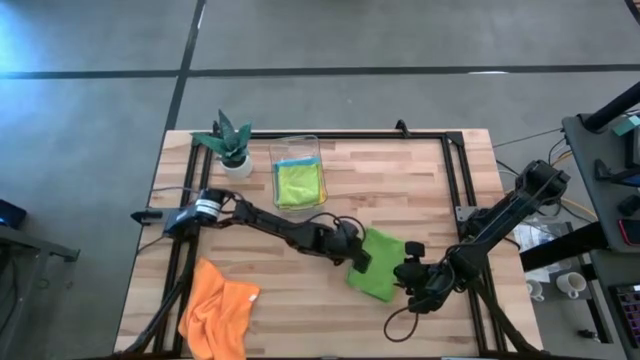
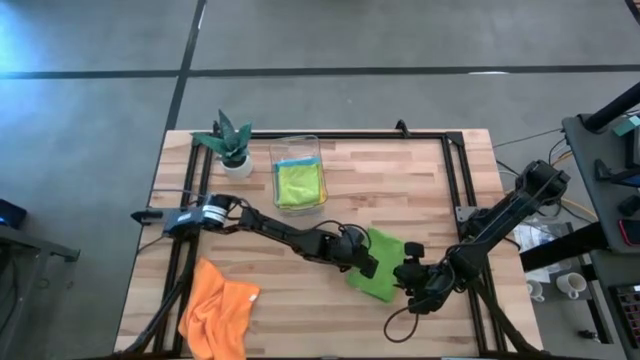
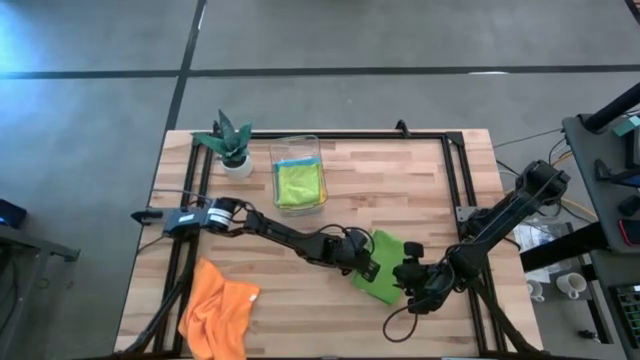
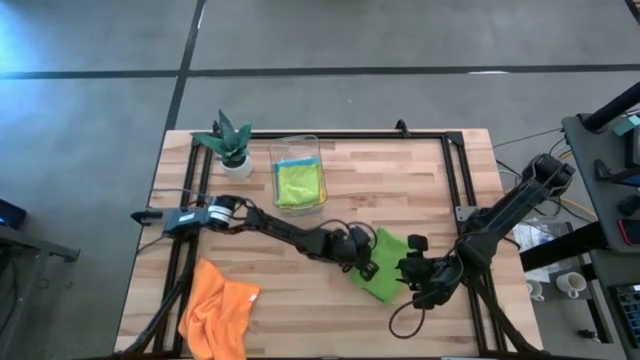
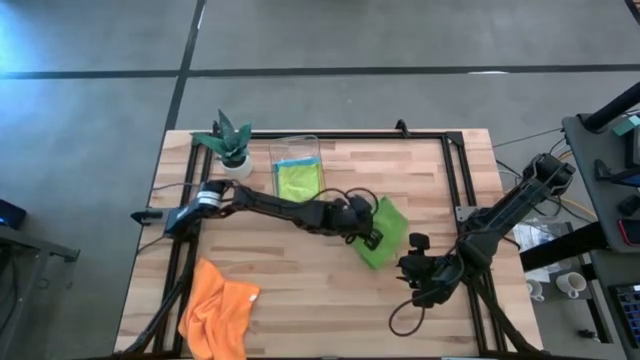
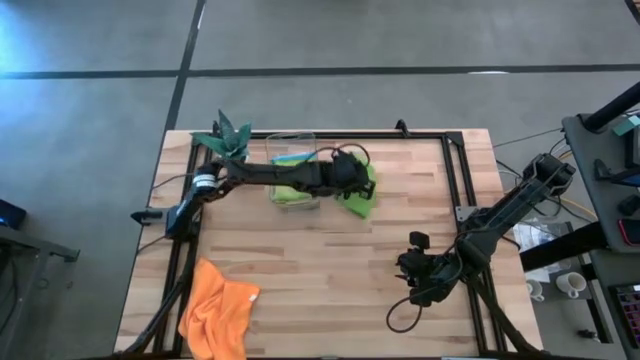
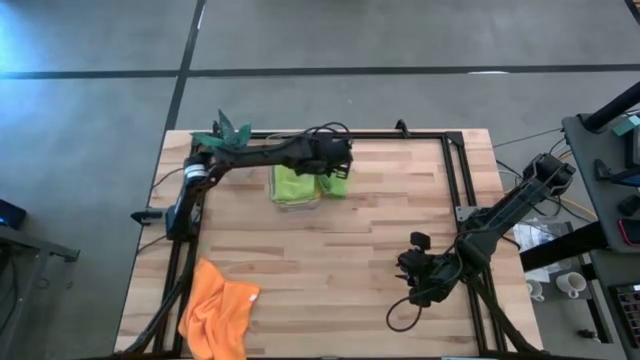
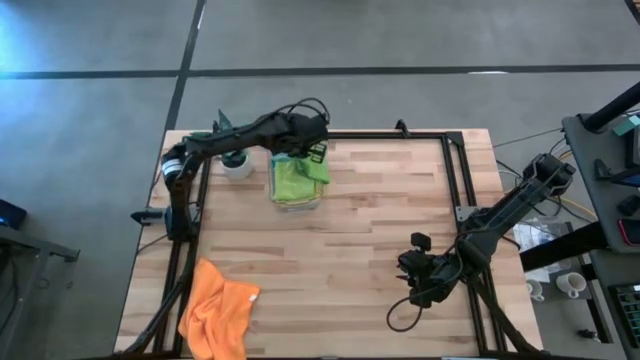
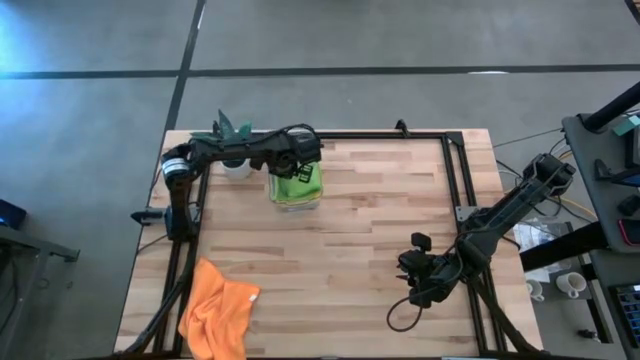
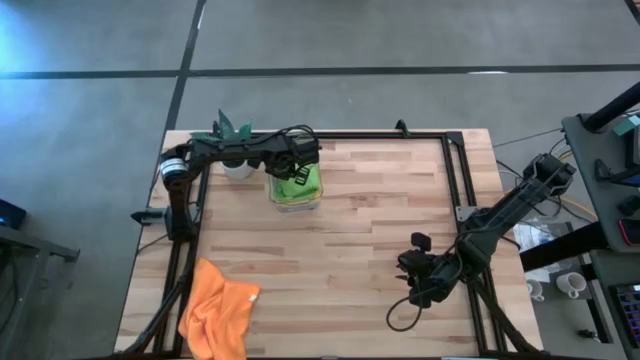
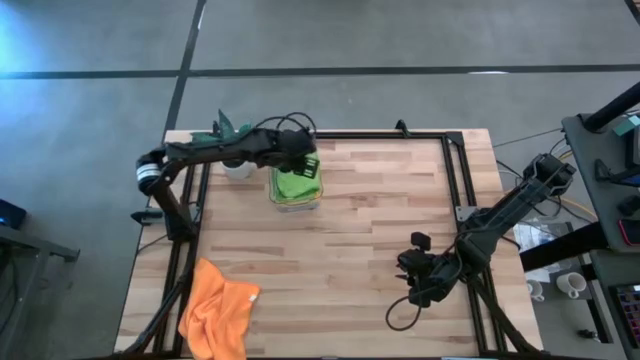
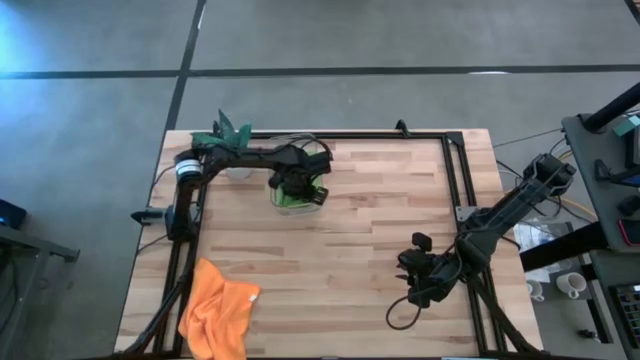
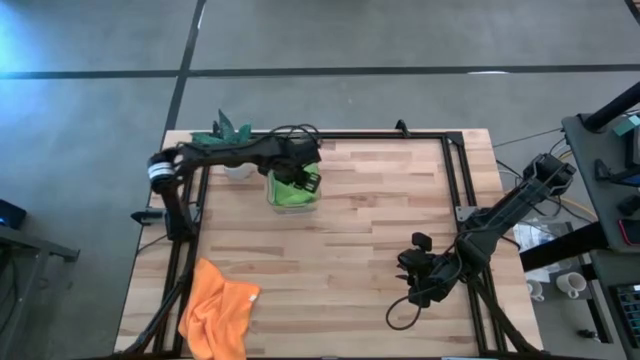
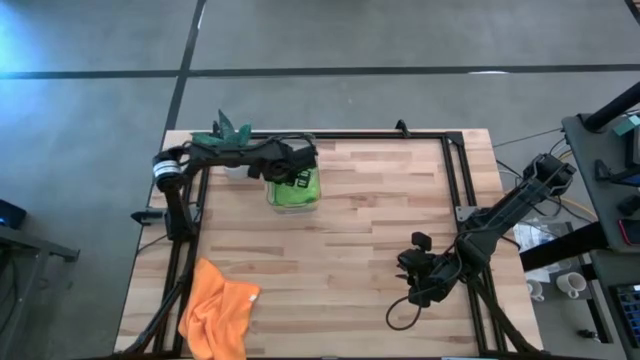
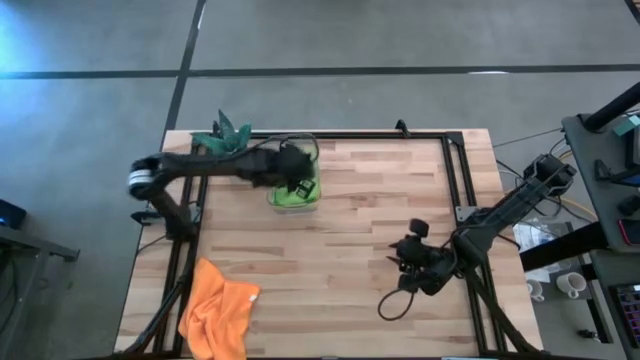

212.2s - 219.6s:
Task: Fold microfiber towels
Stack the green microfiber cloth on top on the light green microfiber cloth into the bin

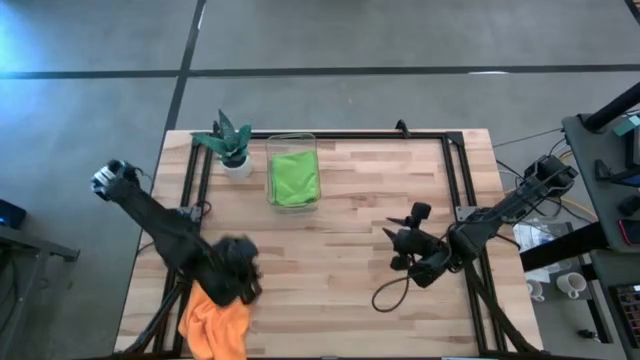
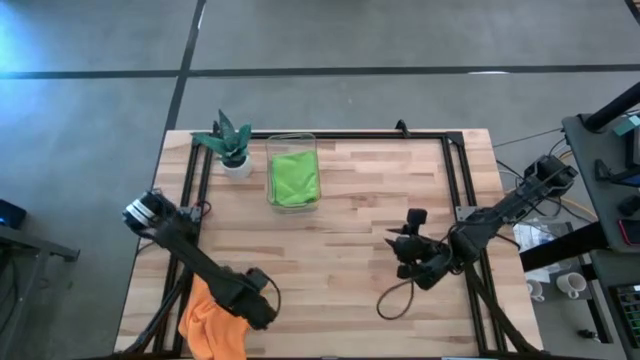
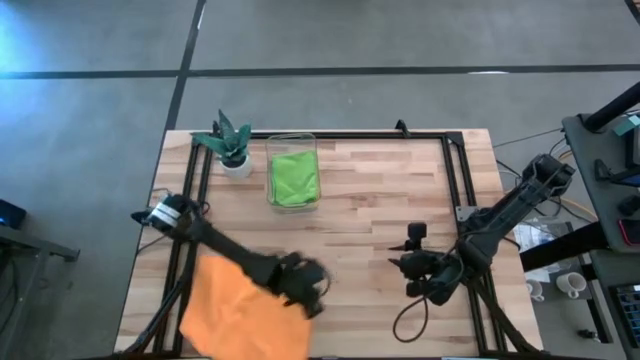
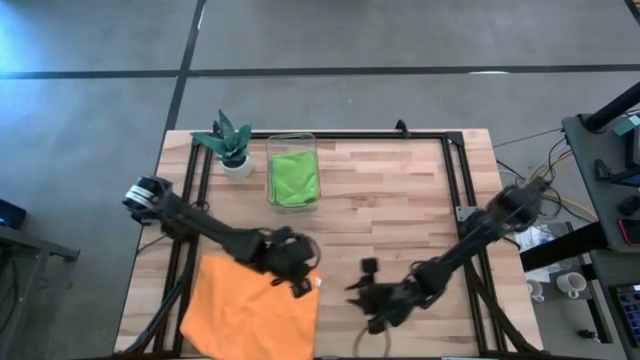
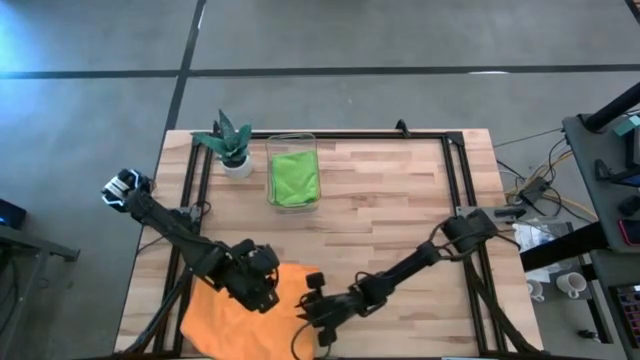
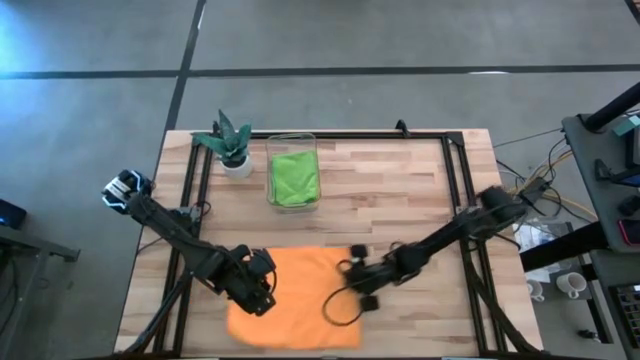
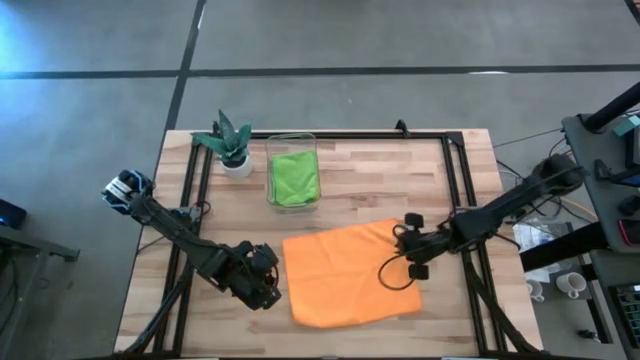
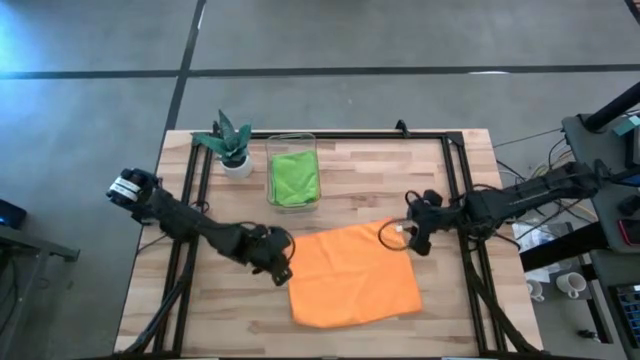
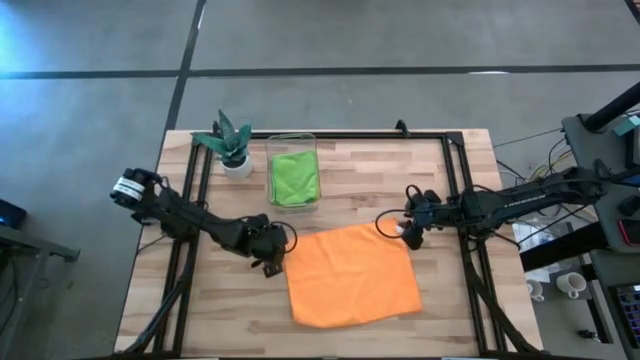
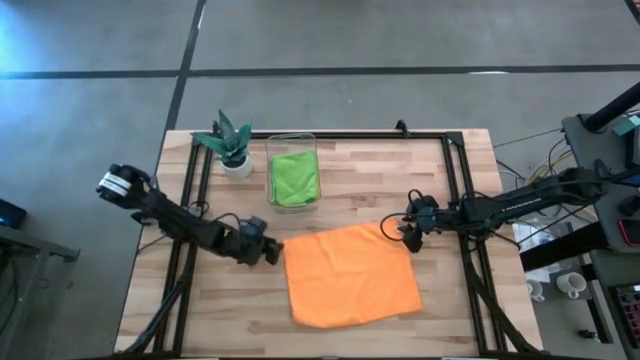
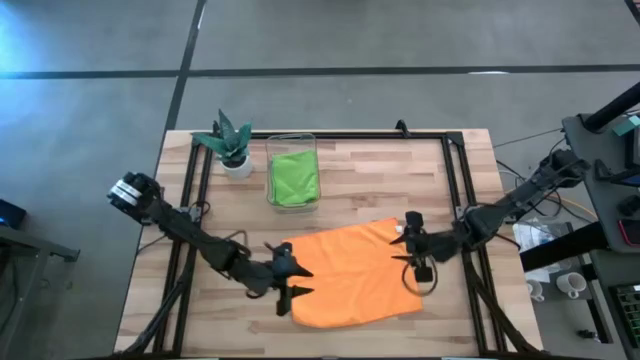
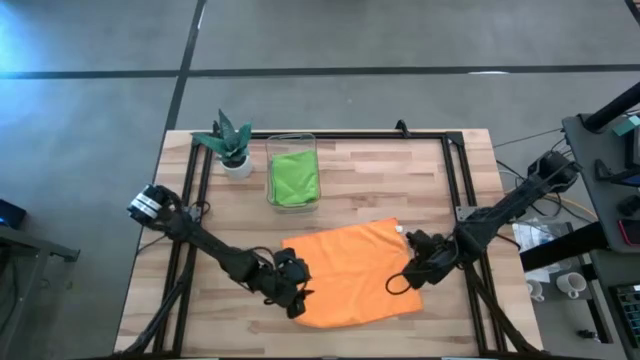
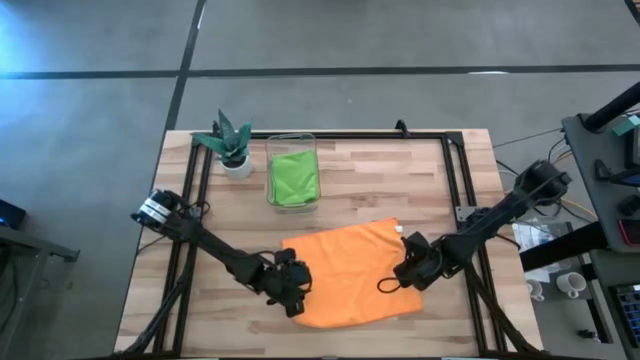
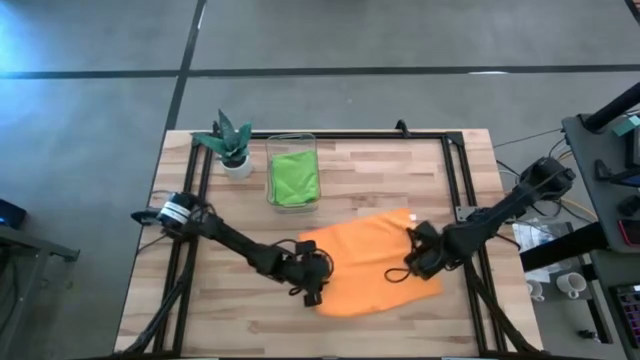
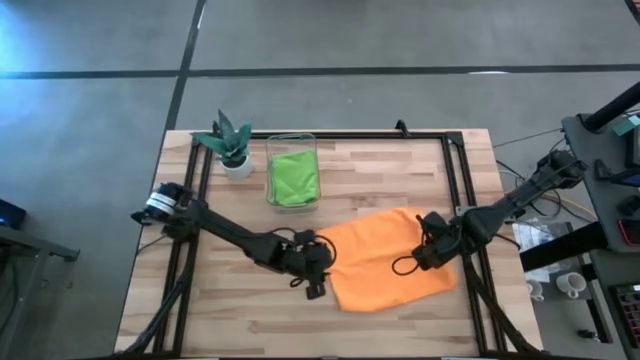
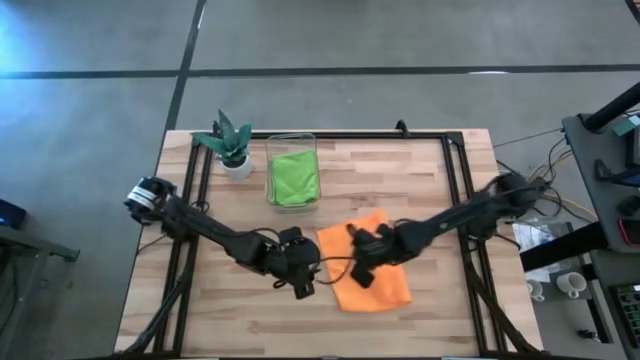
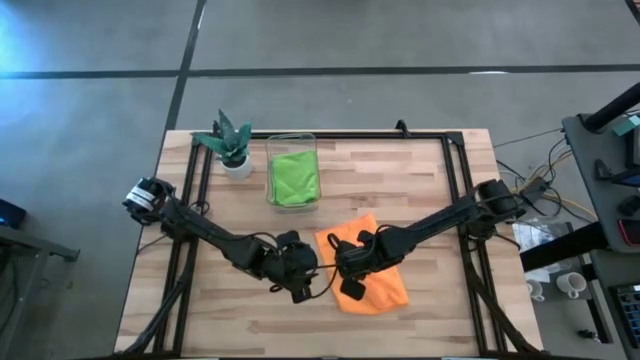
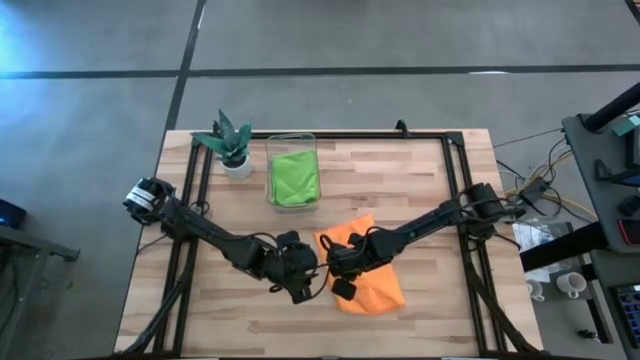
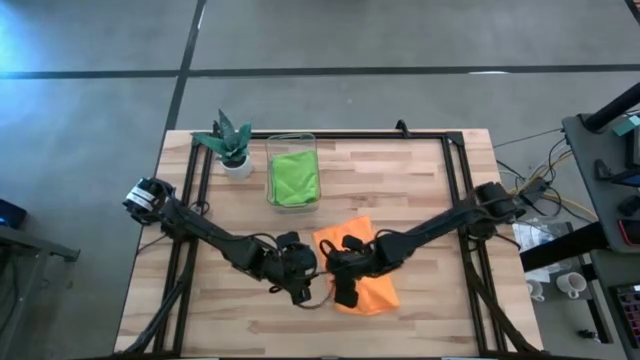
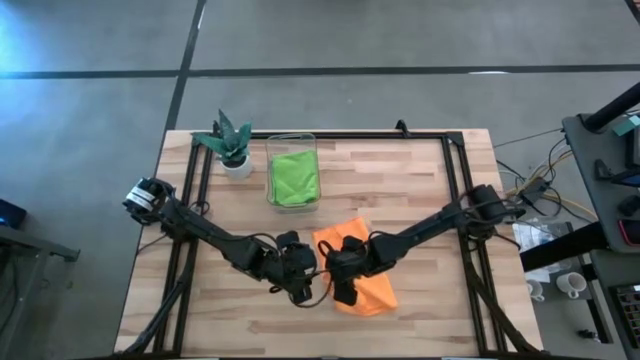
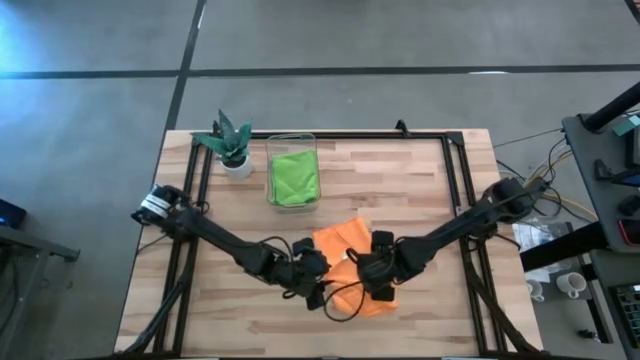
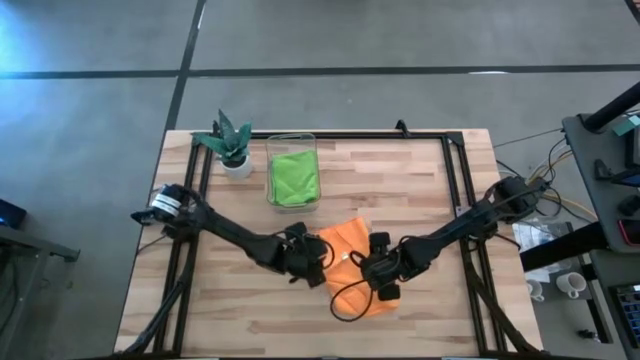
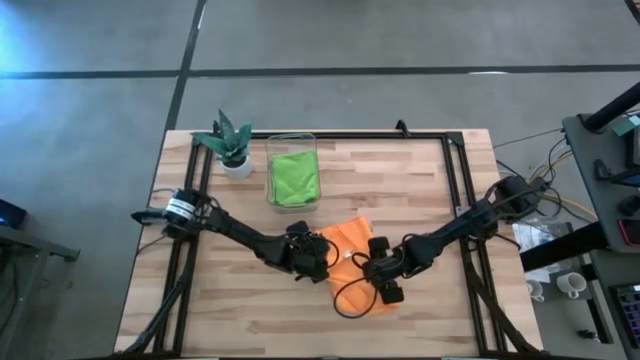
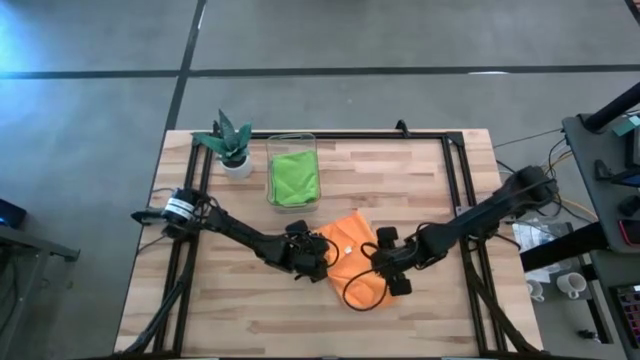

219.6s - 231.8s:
Fold the orange microfiber cloth
